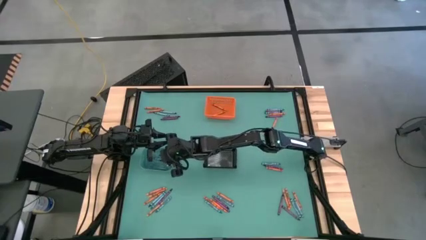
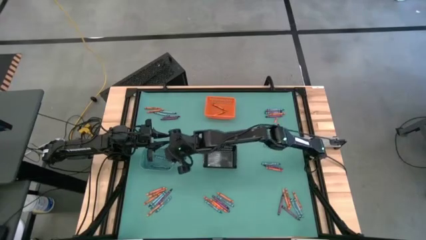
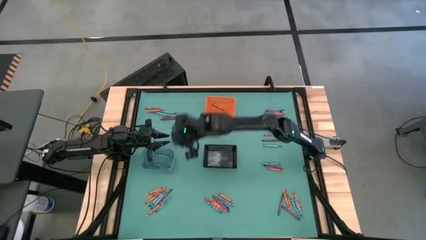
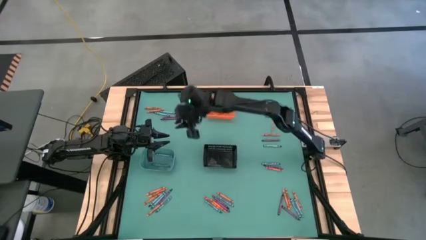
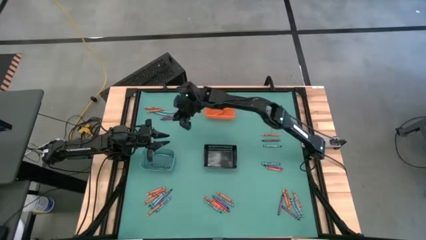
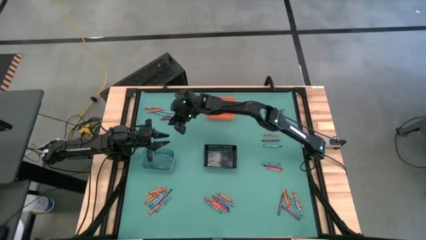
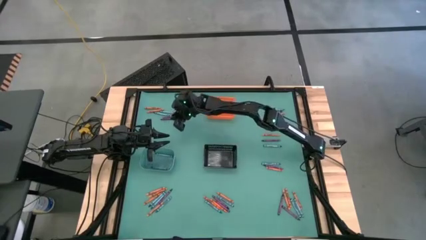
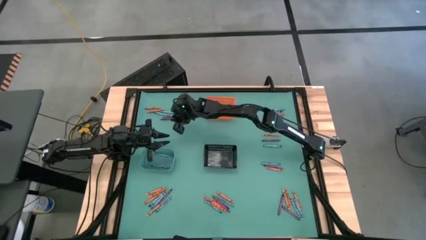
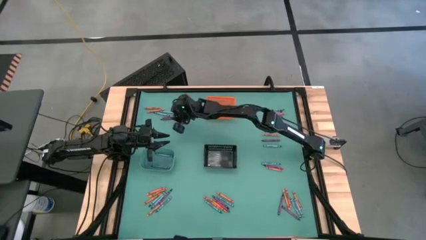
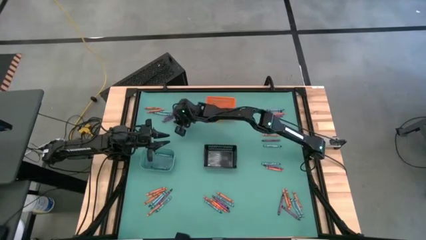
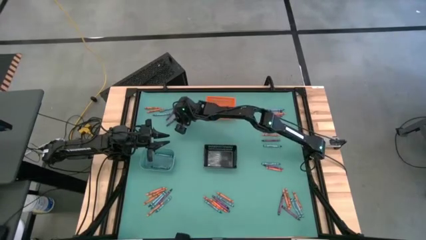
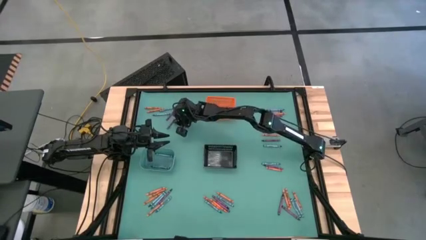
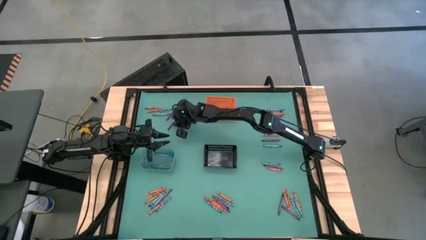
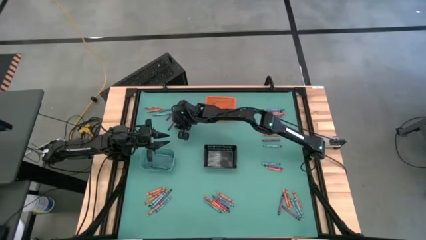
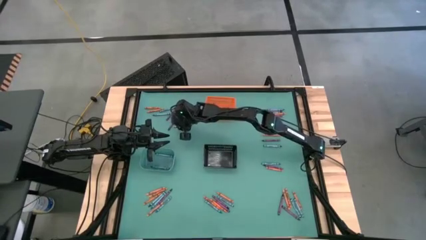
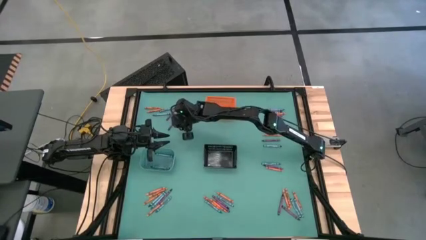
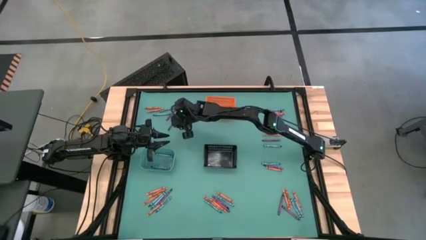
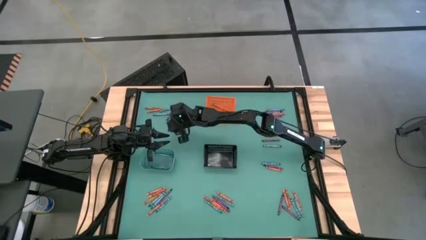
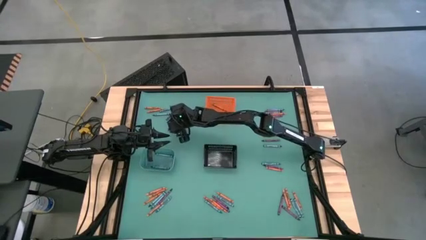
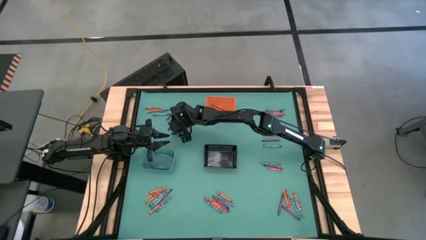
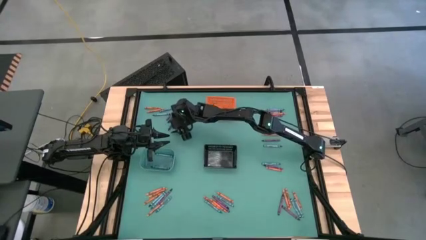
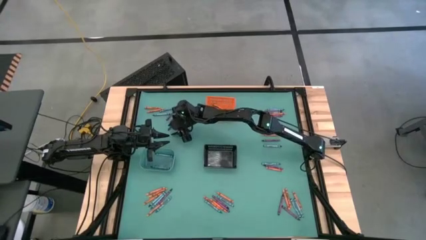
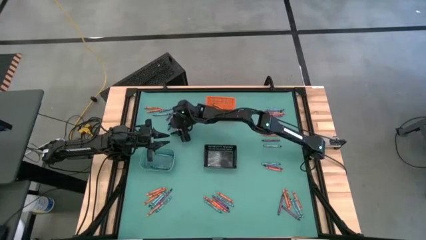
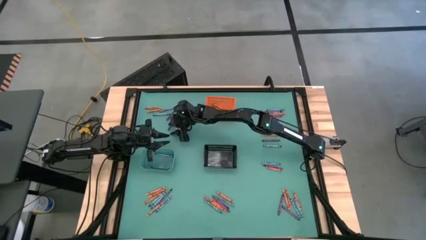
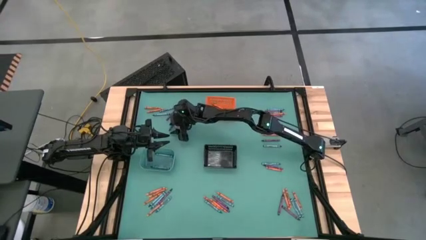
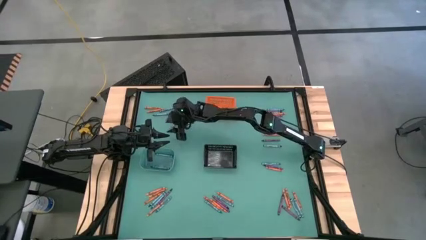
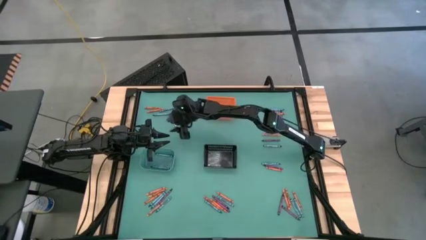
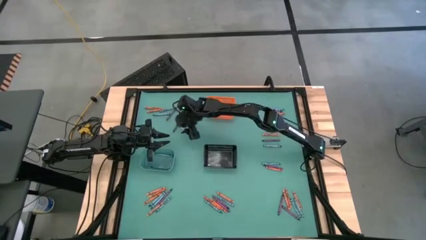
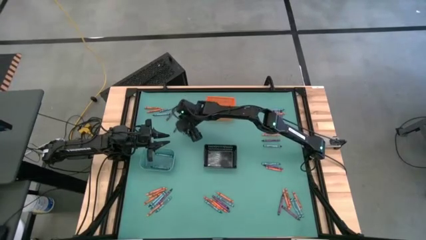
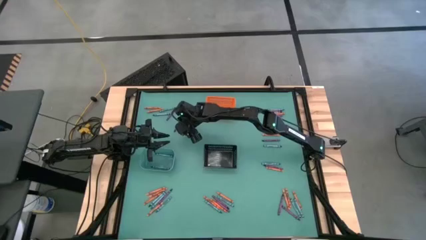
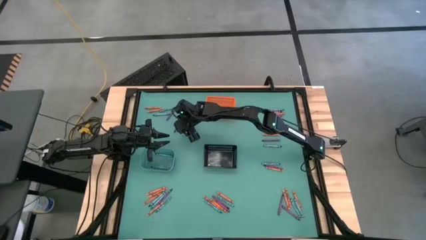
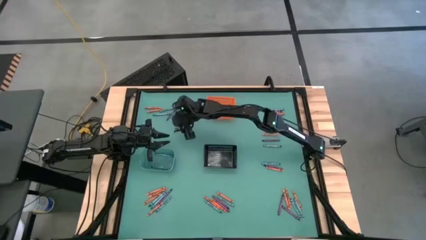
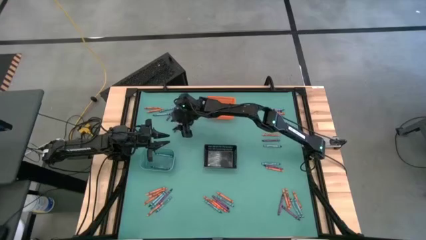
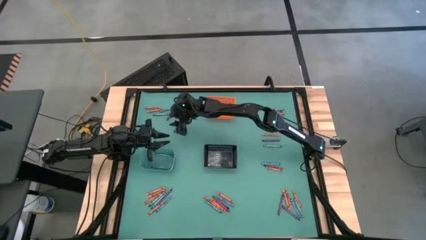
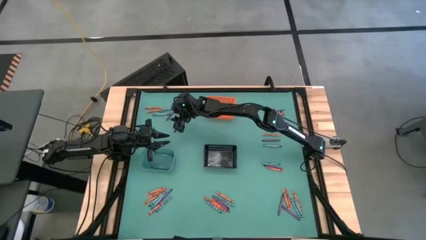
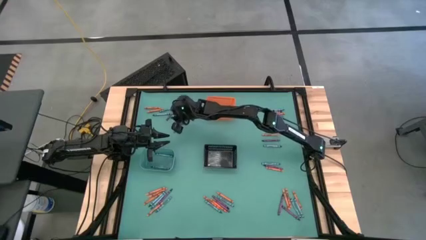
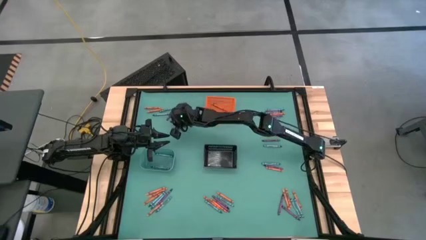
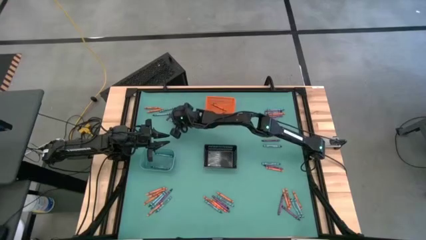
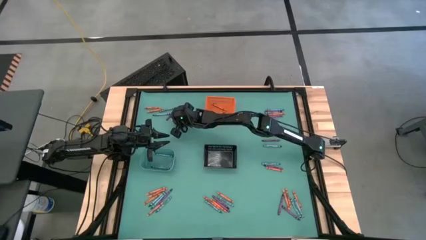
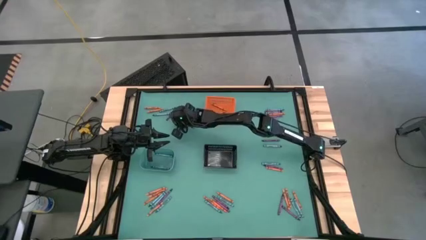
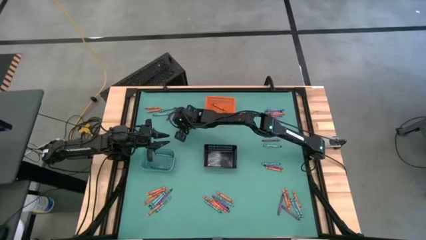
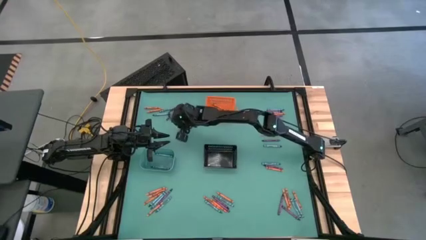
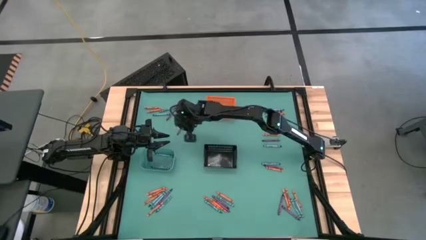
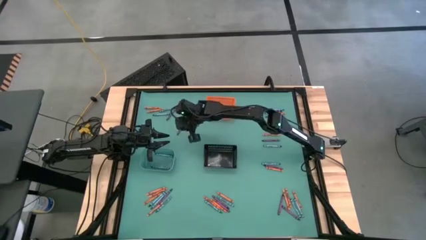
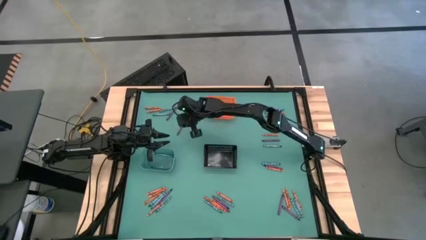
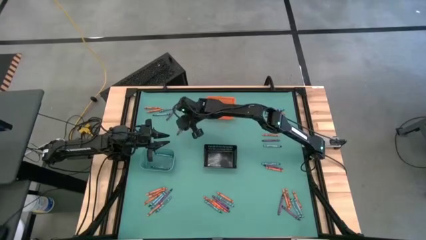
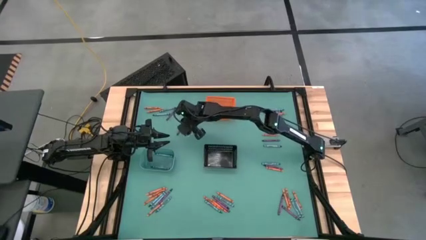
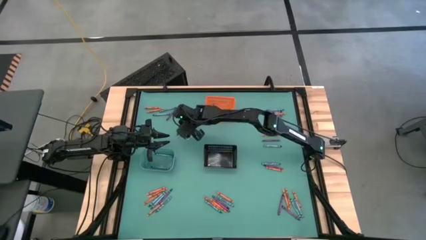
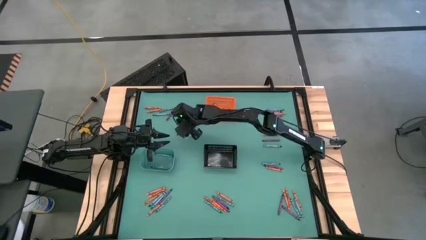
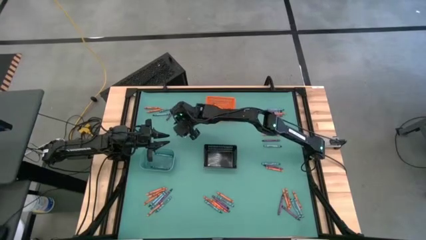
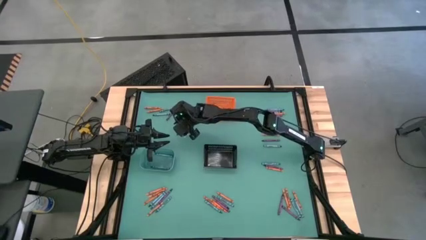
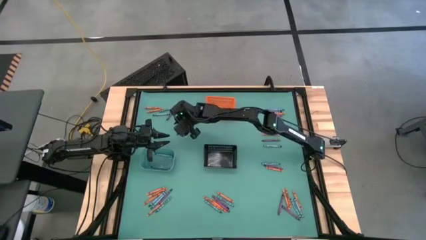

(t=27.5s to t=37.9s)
Task: Sort crayons
Put the violet crayon into the black bin
